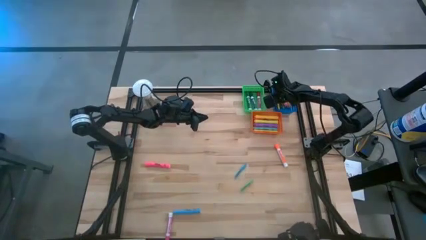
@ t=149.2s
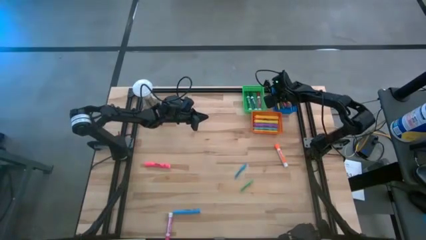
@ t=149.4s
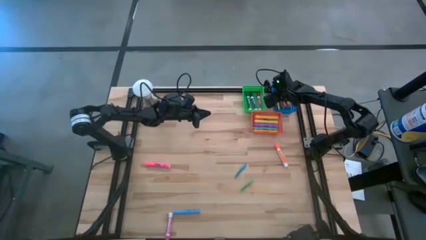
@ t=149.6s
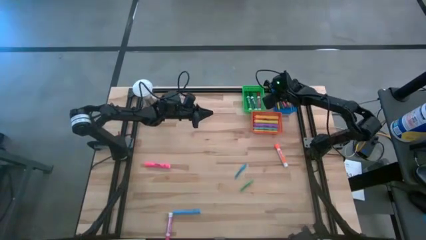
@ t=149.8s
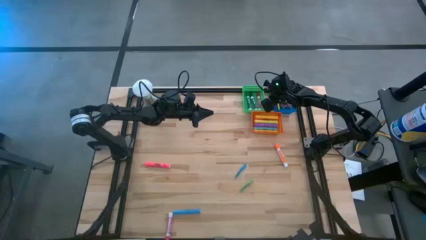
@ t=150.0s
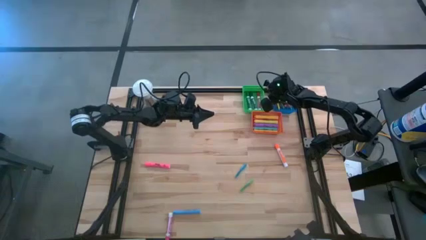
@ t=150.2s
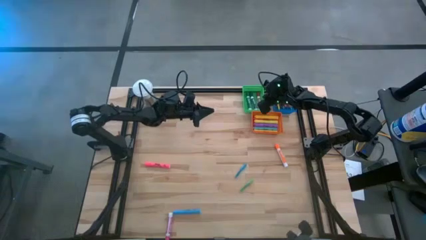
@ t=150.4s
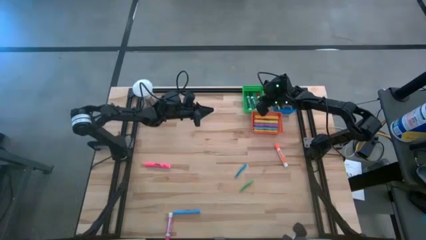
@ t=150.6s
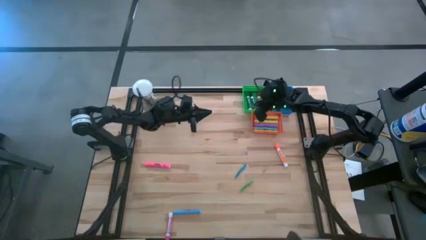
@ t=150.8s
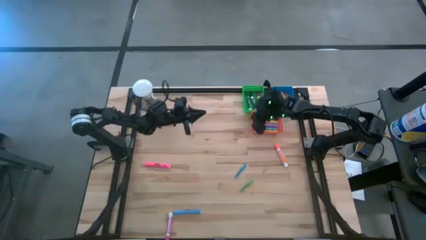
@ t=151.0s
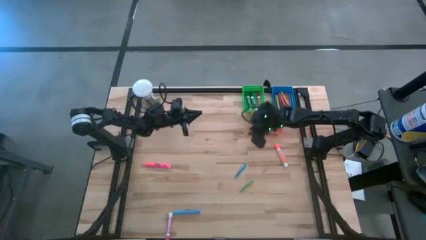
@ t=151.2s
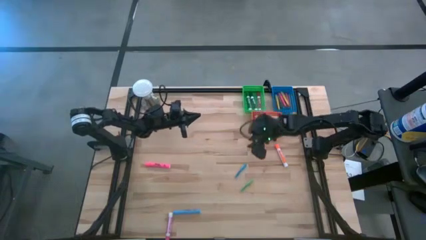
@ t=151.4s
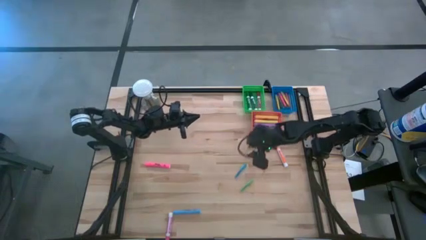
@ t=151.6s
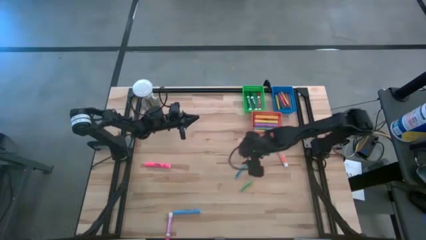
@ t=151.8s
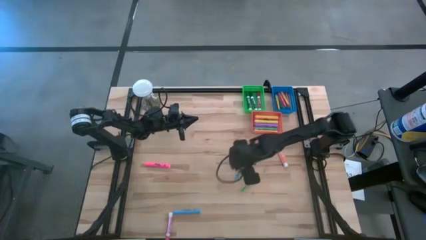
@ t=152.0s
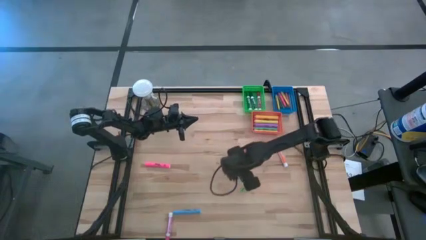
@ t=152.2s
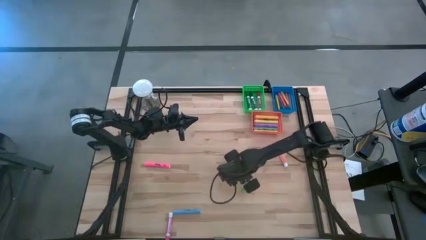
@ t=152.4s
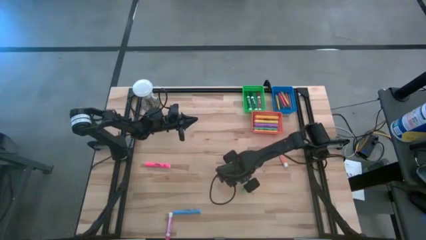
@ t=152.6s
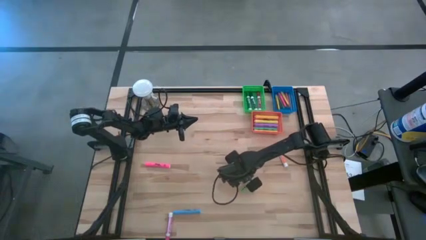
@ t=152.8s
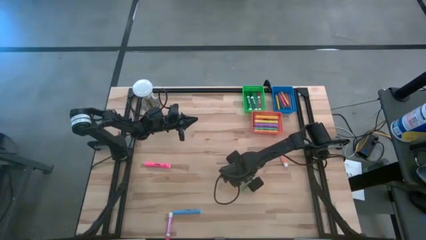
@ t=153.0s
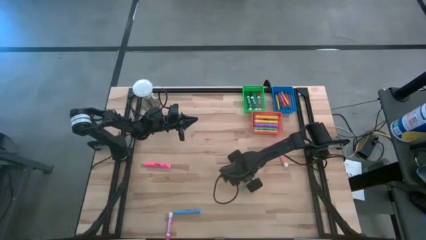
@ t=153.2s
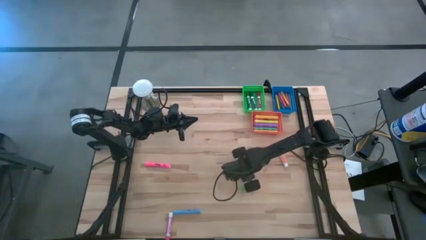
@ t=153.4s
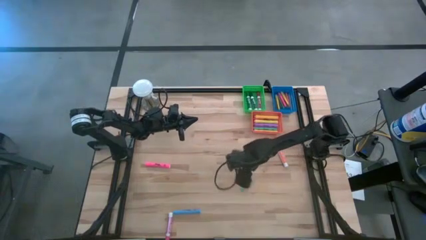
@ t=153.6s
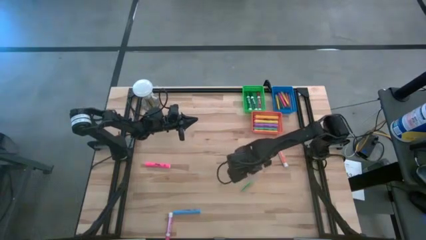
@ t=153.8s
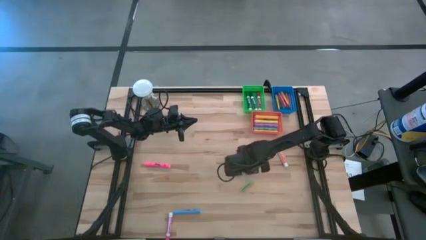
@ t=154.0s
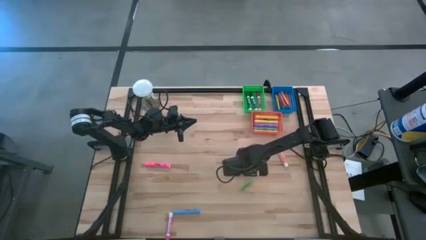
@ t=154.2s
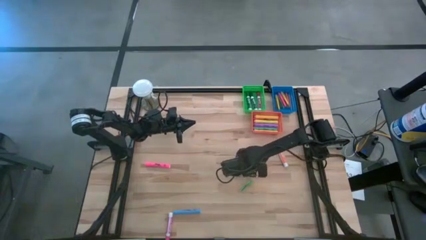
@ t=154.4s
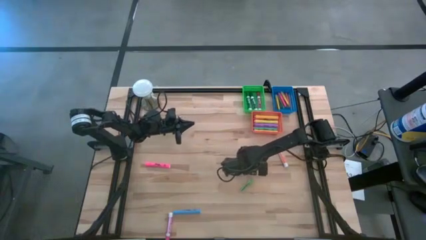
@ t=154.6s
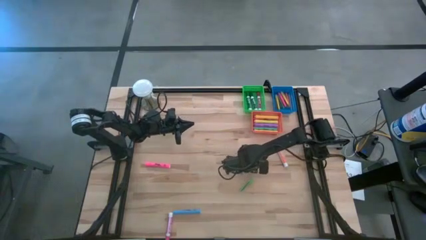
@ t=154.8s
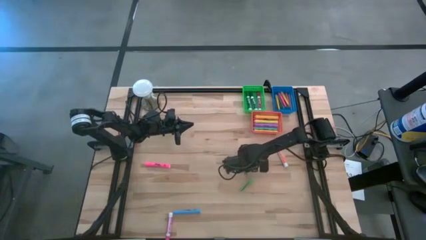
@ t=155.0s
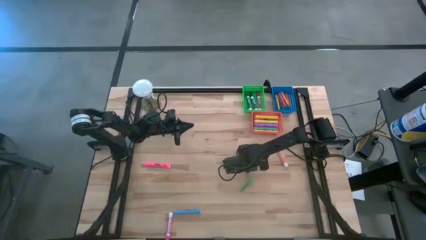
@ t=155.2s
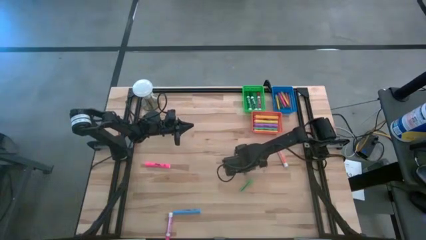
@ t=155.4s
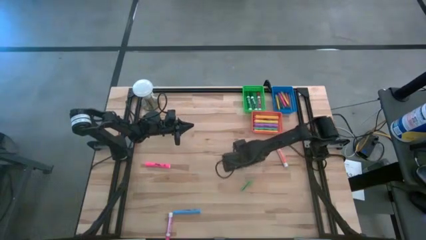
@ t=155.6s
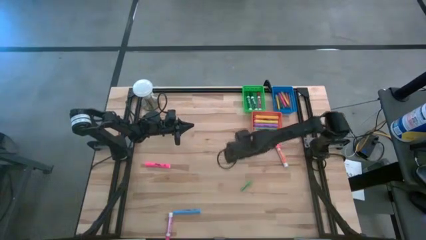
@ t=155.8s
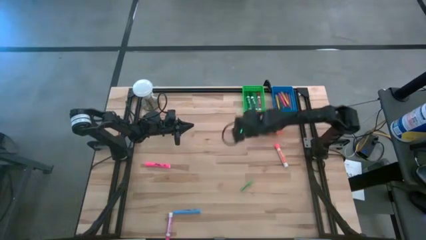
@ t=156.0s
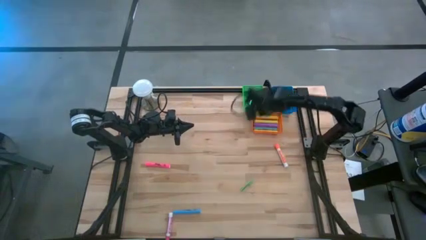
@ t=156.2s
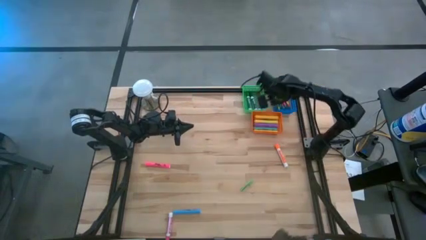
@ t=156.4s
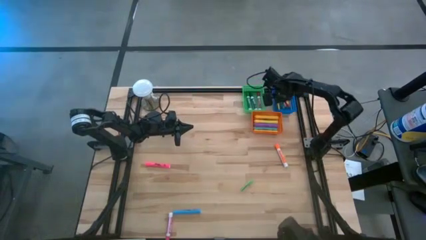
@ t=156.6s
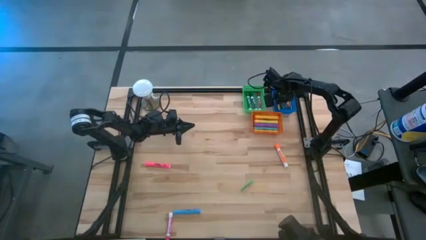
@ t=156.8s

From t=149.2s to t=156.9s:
Task: Pick & Place Markers
Put the blue pen into the blue bin

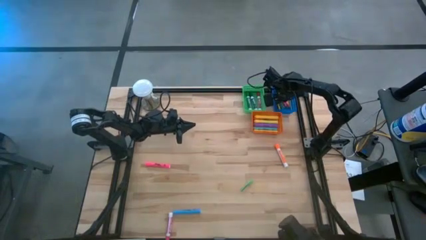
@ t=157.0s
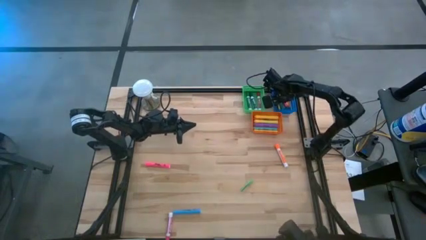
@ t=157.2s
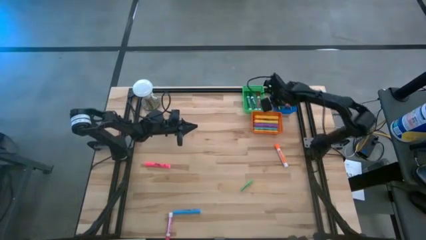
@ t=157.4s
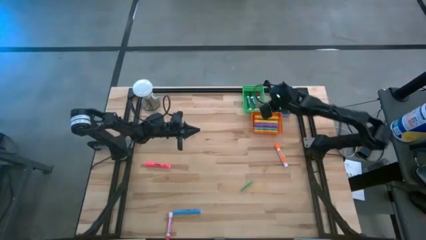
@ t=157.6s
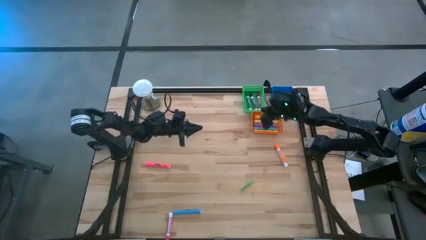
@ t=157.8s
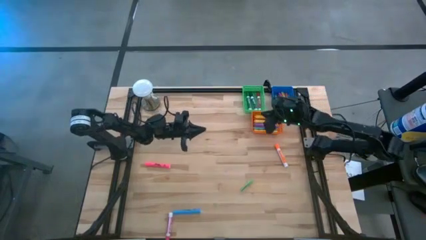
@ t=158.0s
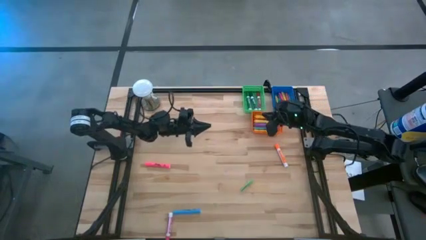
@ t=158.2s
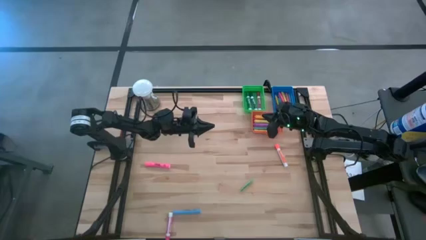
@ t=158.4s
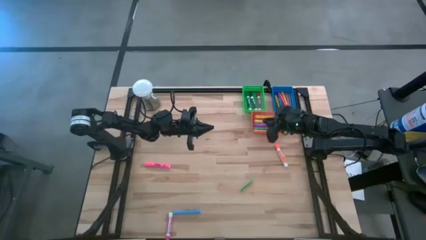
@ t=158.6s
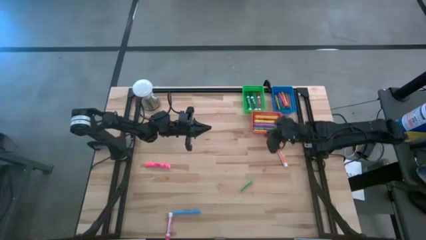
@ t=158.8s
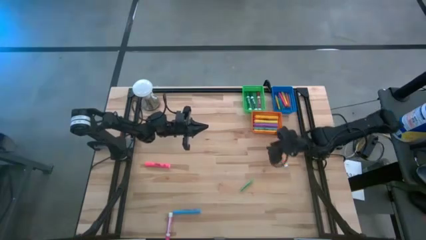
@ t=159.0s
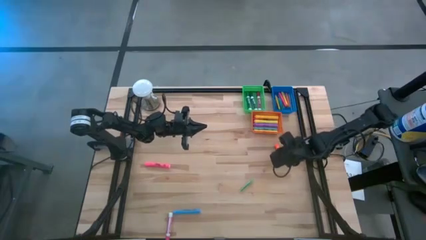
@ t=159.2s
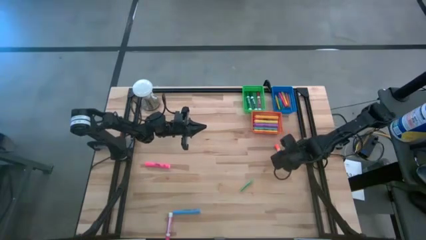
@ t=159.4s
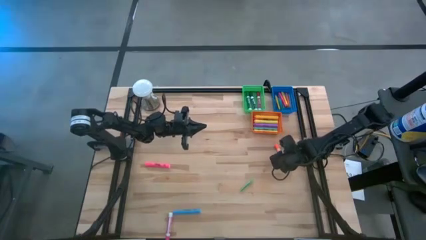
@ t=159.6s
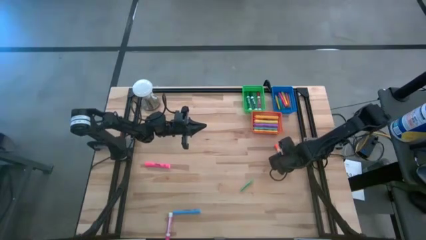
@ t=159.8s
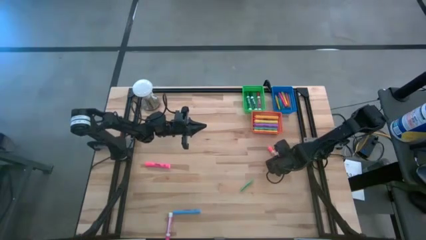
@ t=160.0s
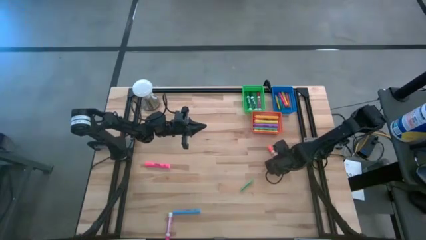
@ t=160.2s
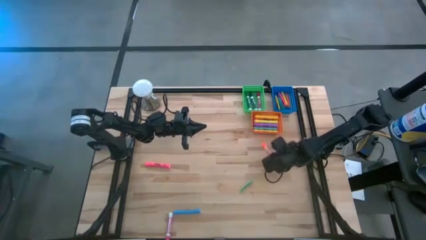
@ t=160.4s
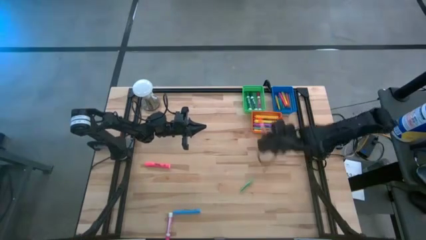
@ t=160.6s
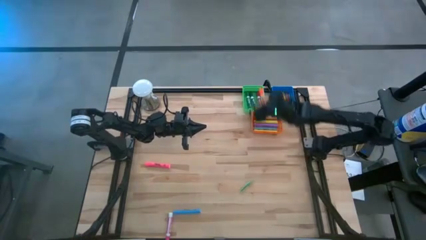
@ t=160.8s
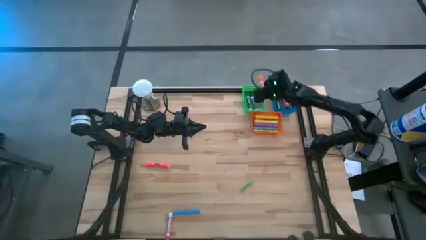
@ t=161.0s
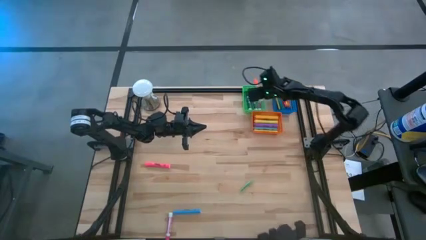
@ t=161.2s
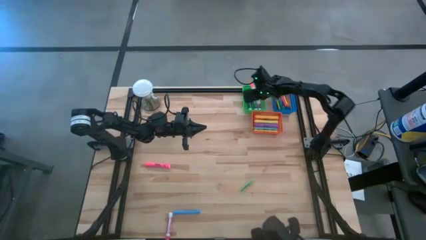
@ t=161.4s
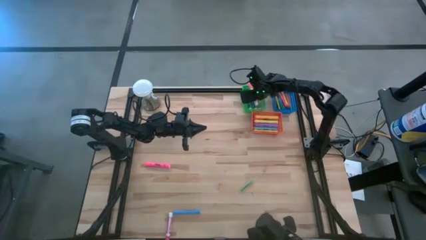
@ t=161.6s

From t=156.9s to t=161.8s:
Put the orange marker pen into the green bin

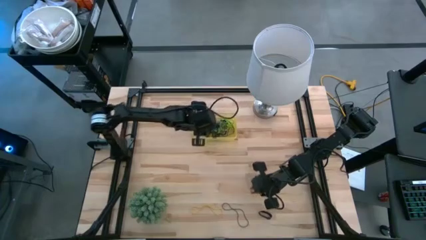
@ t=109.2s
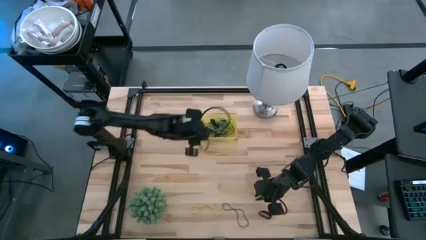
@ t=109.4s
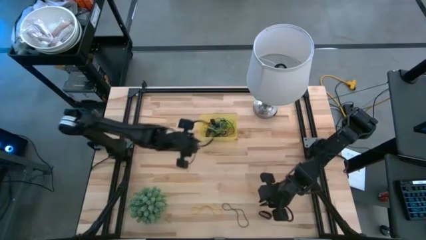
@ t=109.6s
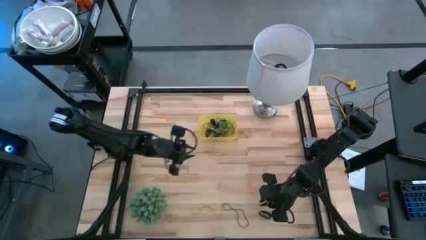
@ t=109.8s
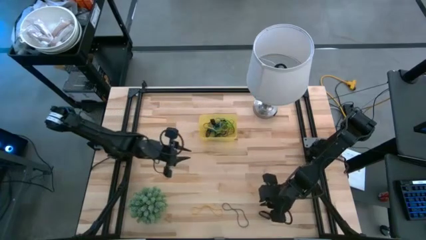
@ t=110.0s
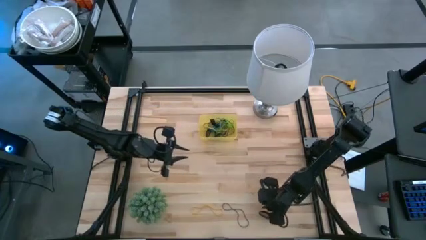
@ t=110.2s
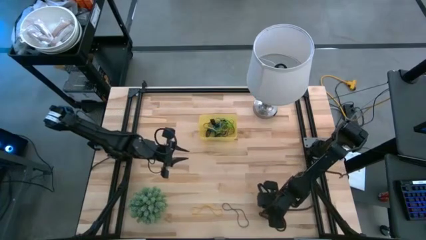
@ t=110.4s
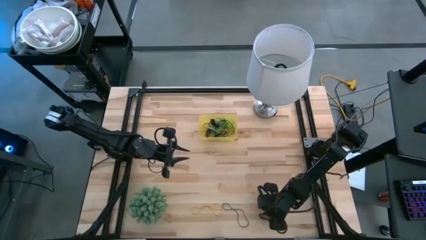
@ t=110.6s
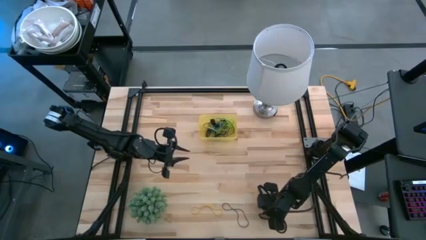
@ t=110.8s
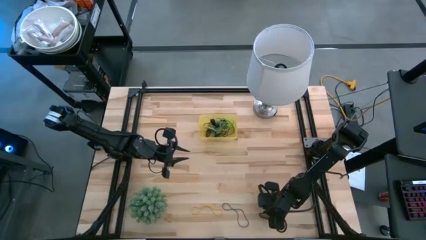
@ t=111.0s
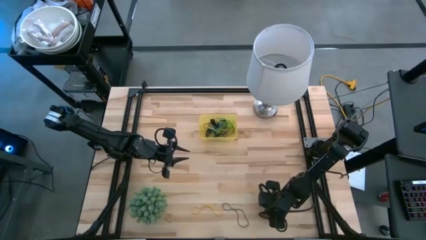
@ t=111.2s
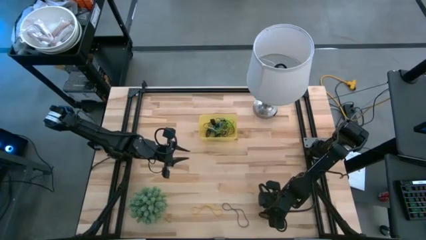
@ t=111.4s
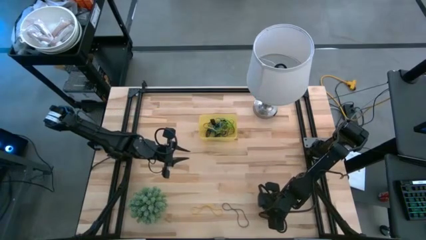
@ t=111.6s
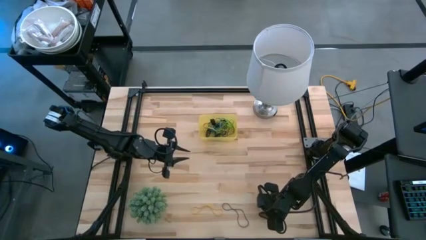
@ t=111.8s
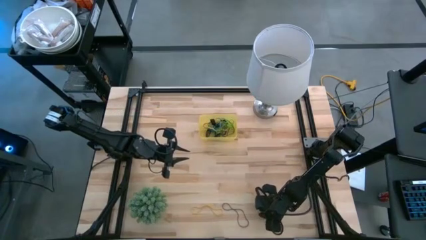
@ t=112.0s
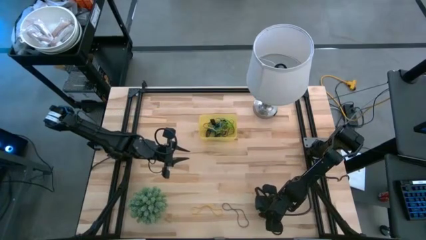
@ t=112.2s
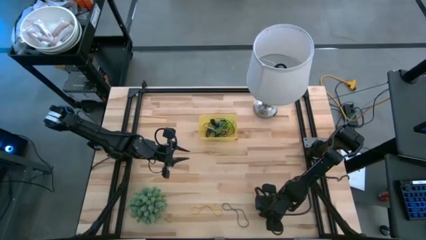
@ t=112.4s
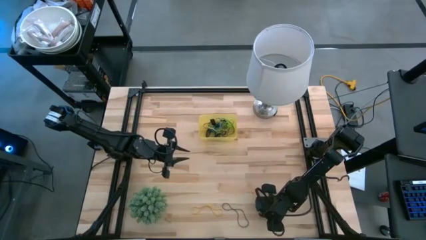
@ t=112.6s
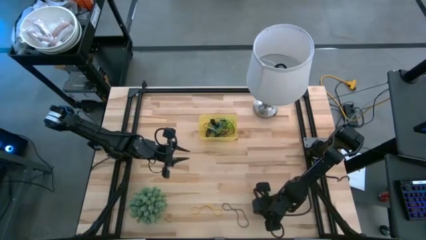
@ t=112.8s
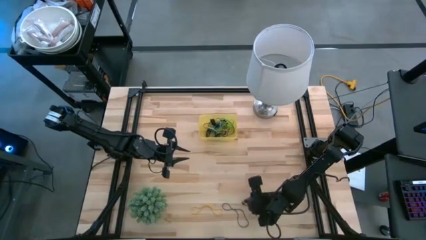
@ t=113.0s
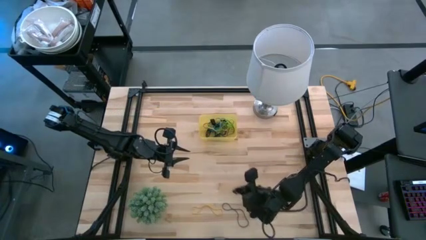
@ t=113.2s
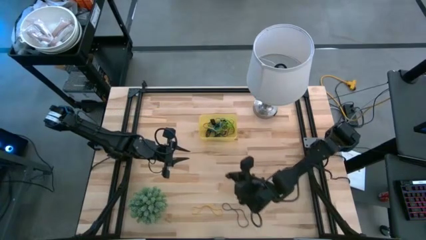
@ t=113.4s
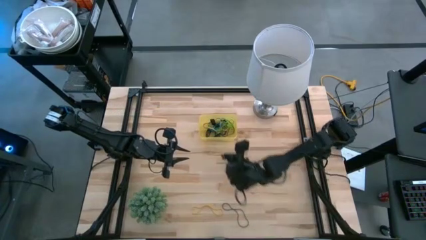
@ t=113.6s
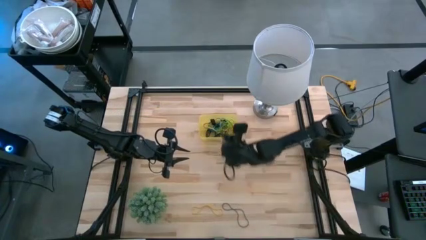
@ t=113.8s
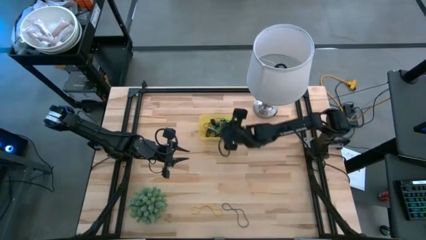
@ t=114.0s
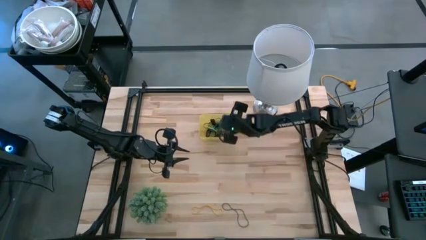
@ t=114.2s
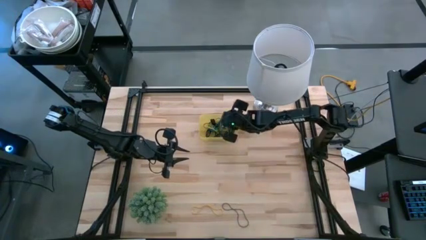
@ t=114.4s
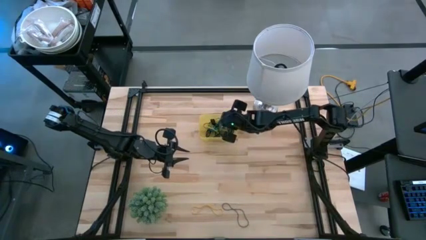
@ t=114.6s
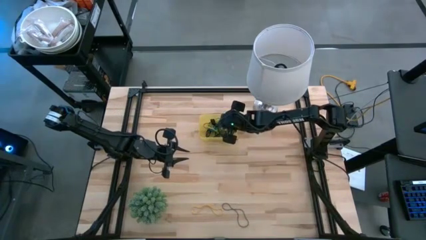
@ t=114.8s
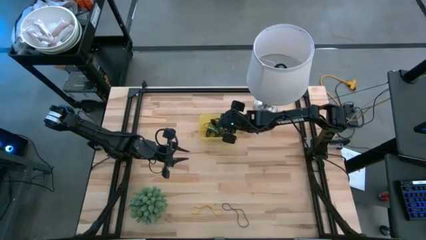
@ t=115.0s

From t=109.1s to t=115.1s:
Task: Pick and place rubber bands into bin
Put the black rubber band into the yellow bin
